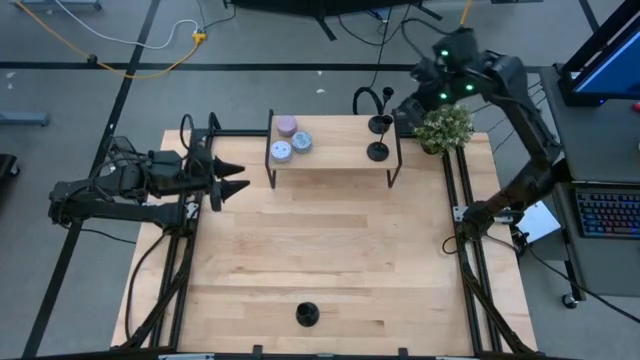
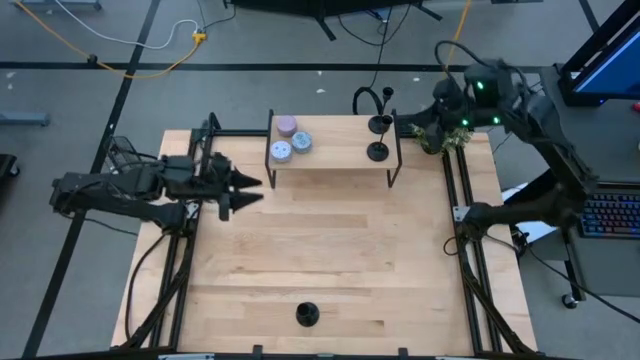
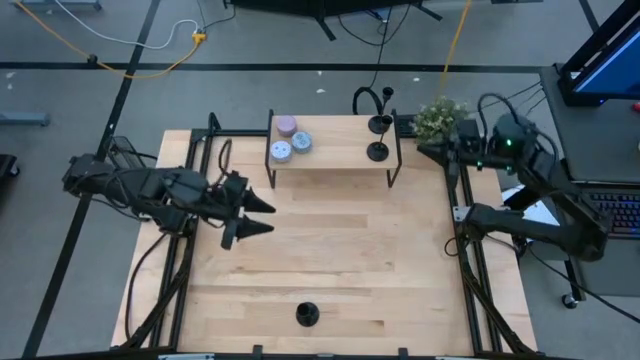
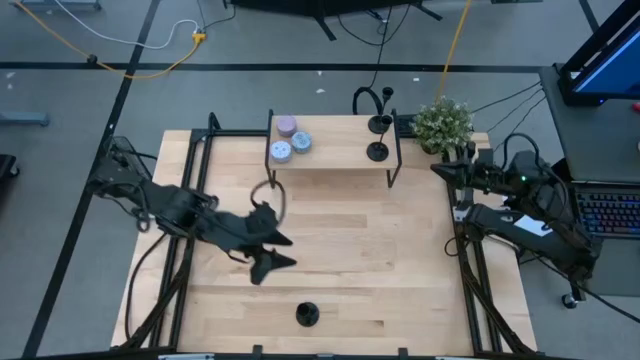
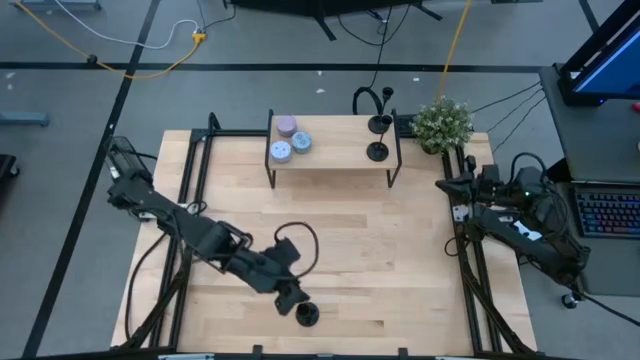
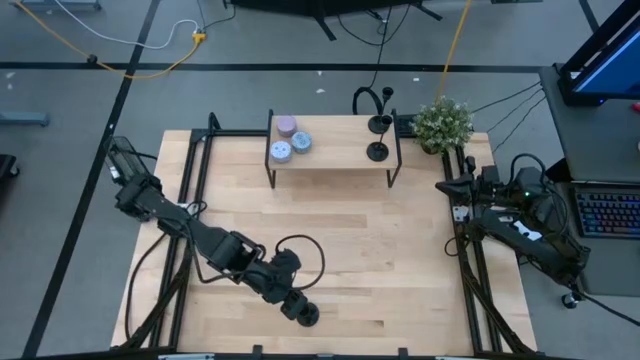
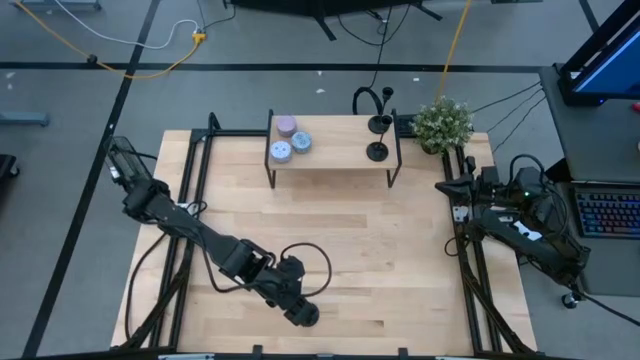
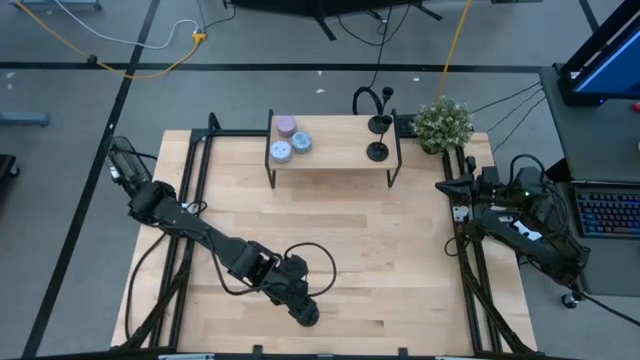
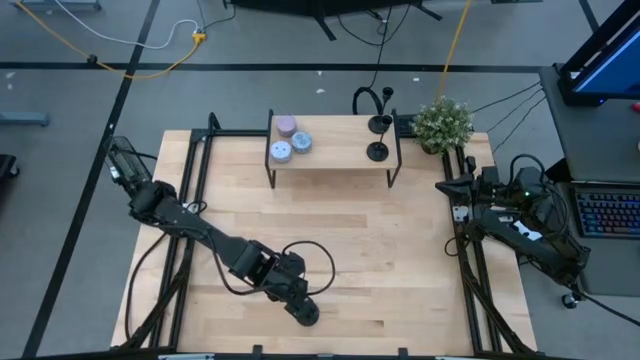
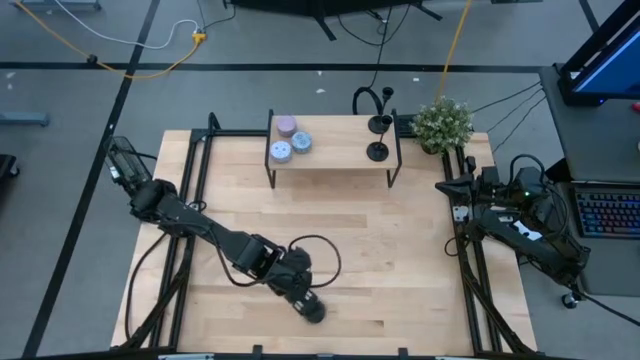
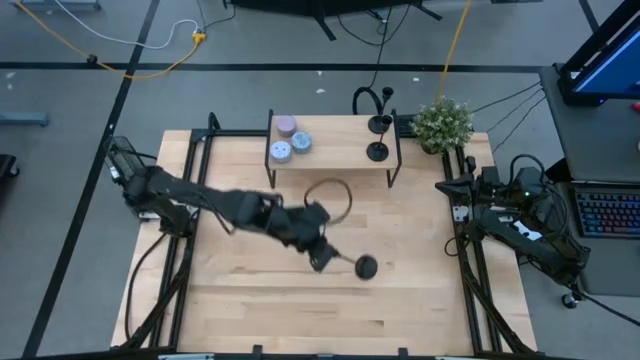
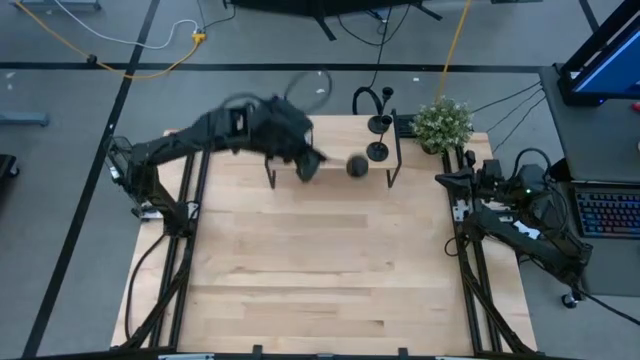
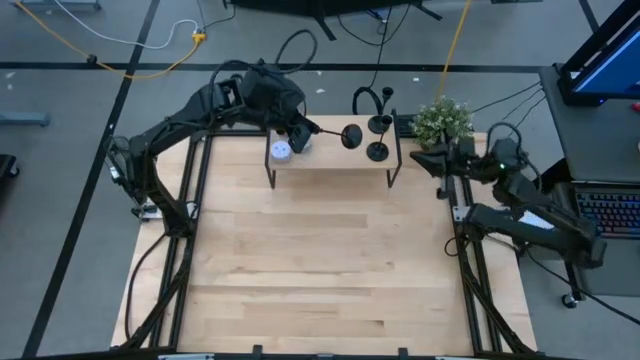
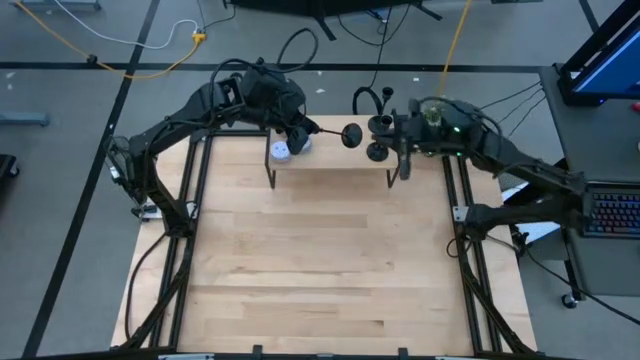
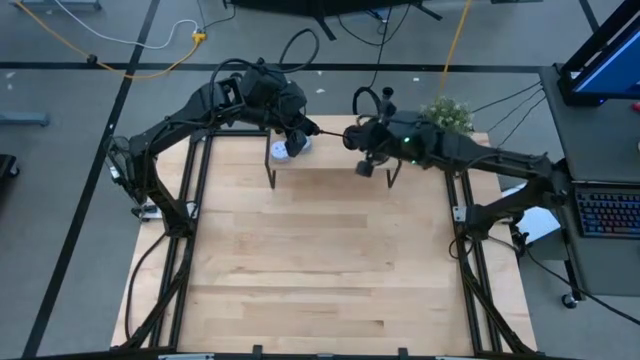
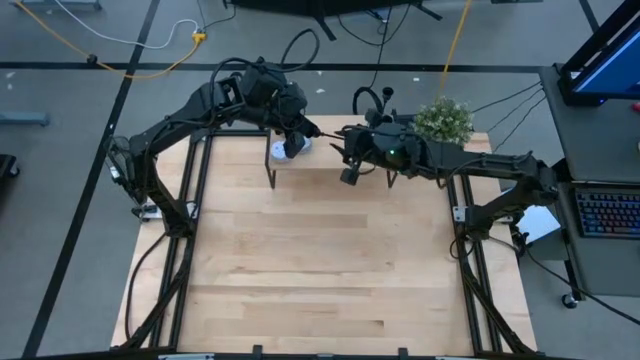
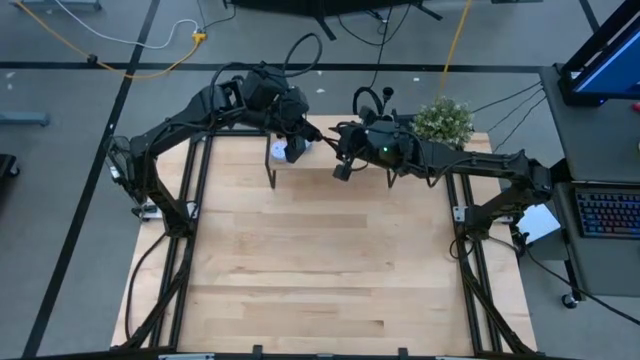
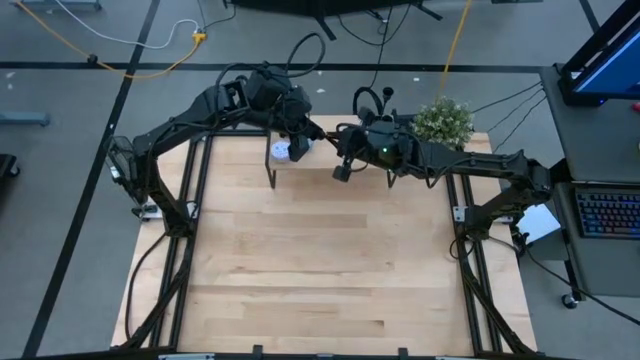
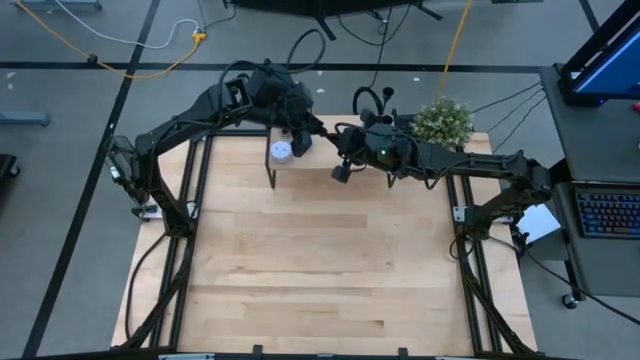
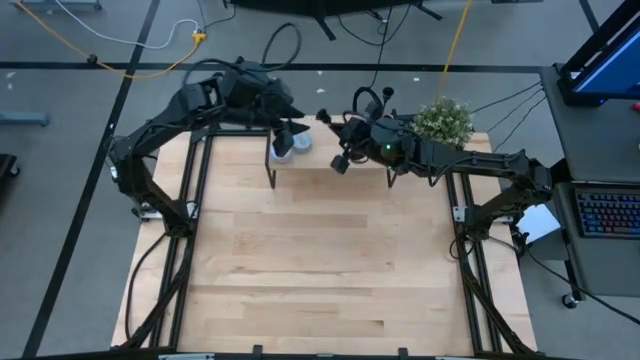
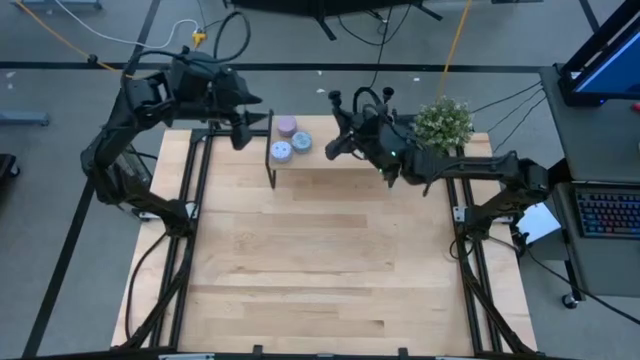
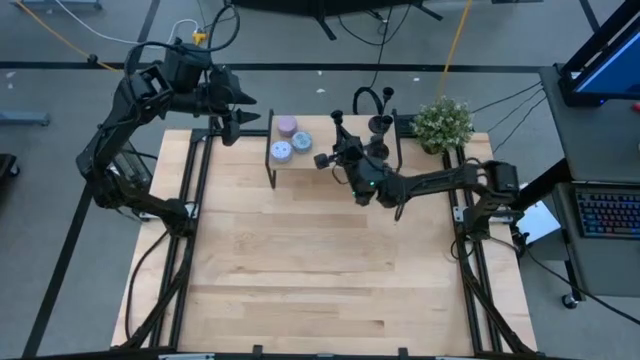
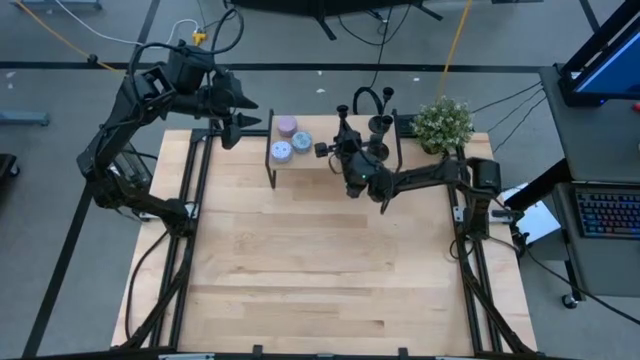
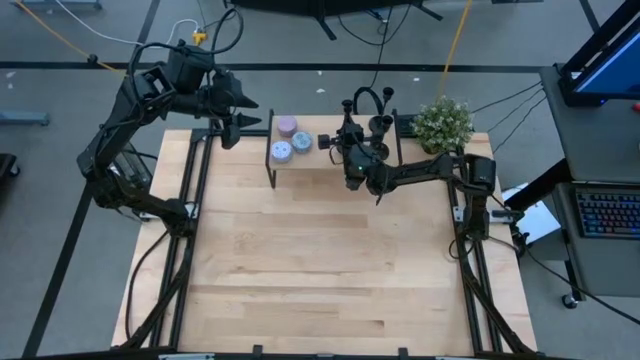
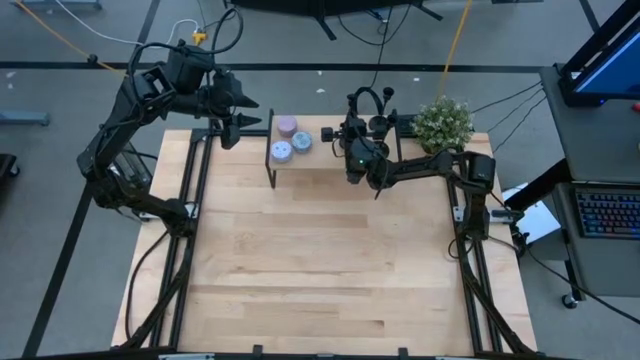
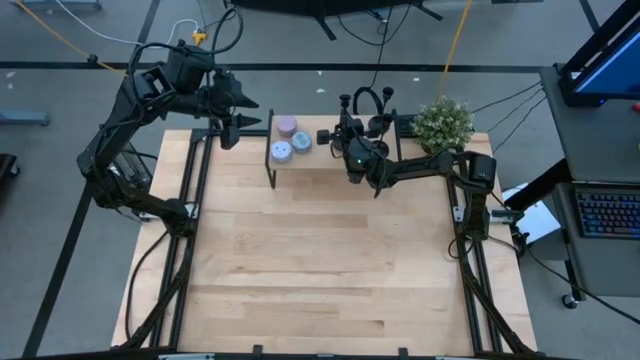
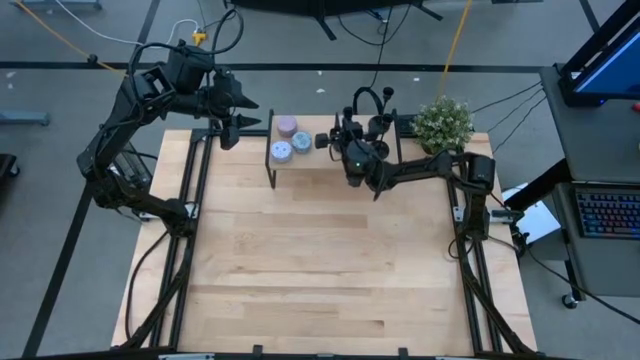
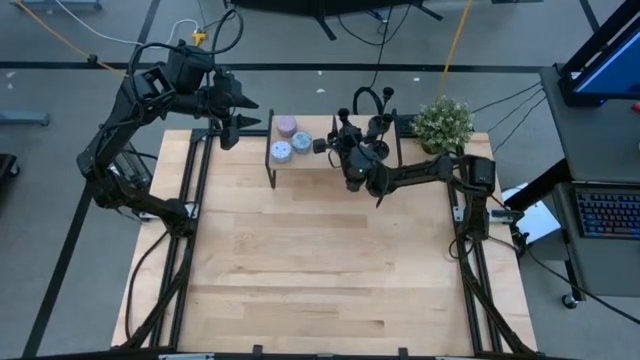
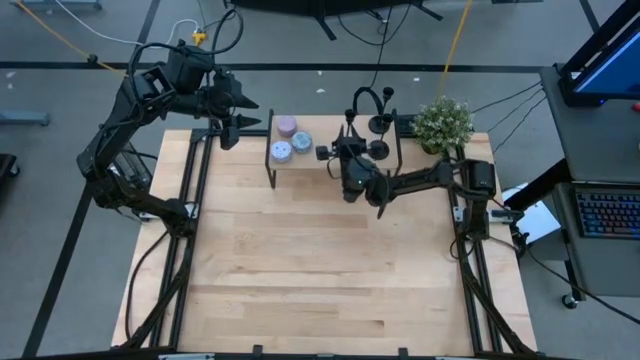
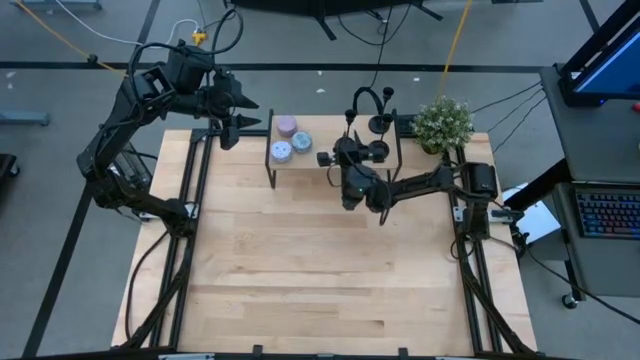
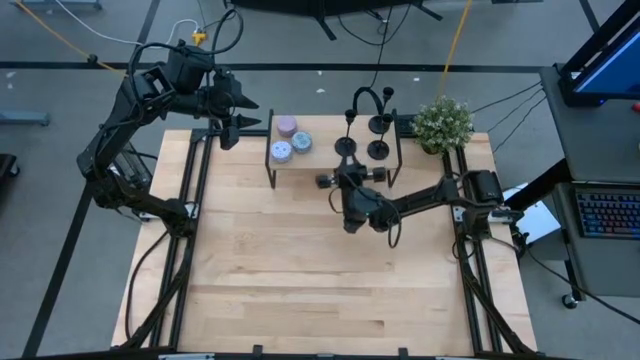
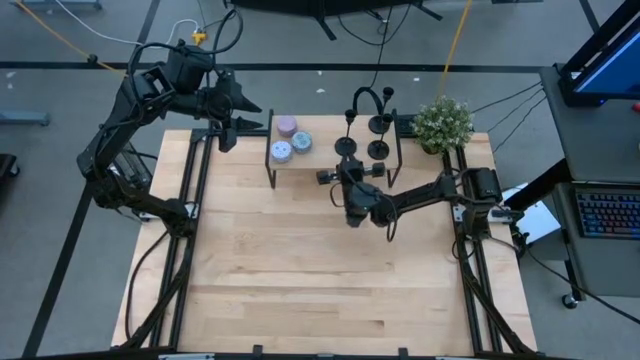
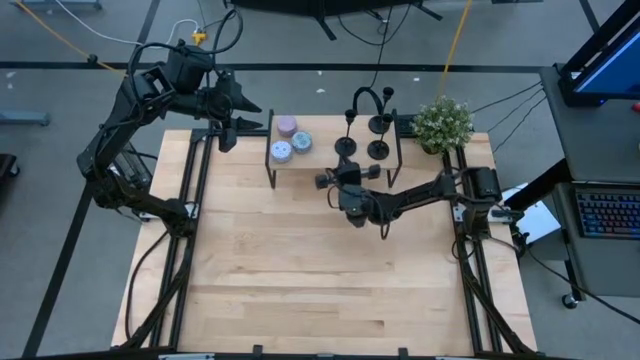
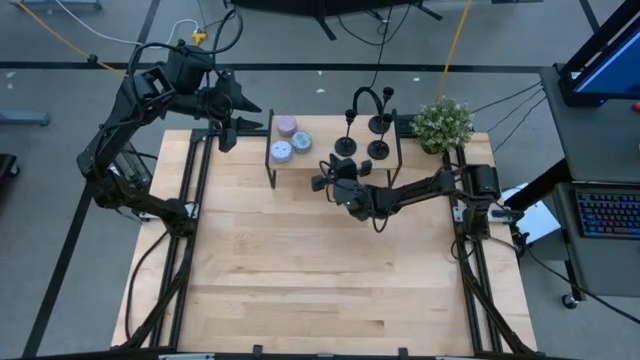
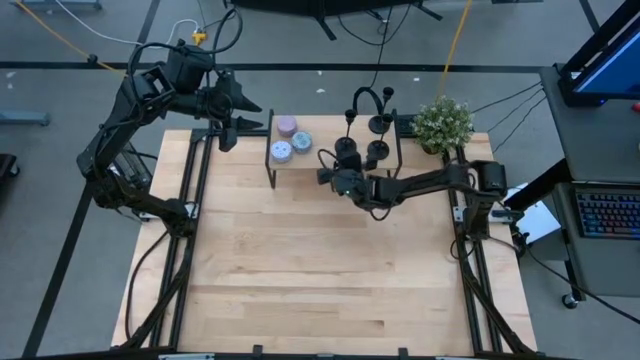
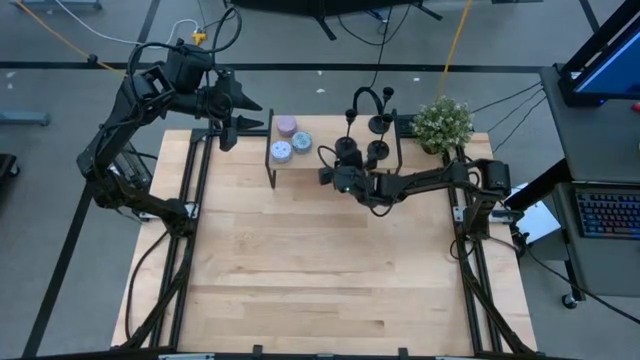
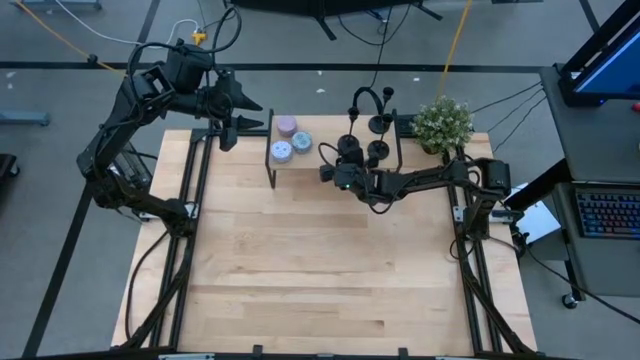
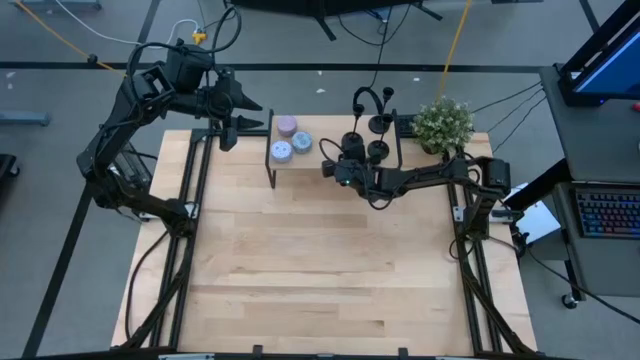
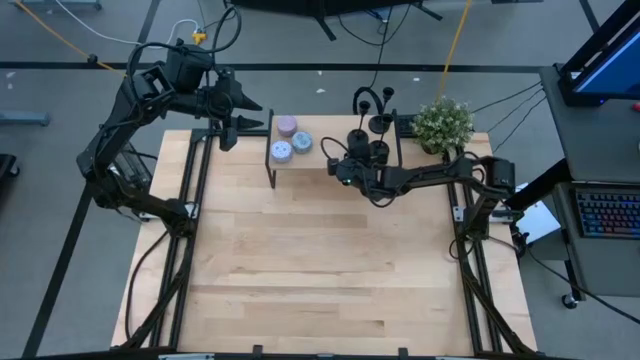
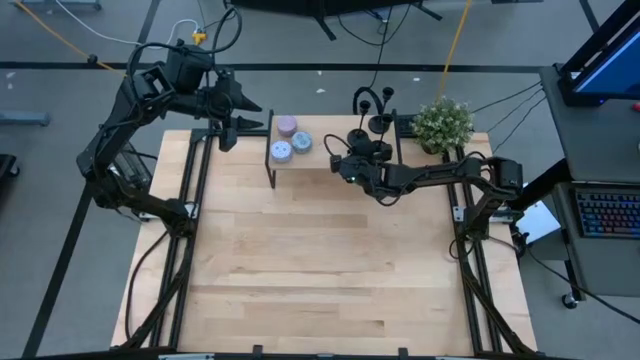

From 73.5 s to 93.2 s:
Task: Pick & Place candle stick holders
Put the candle holder on the shelf

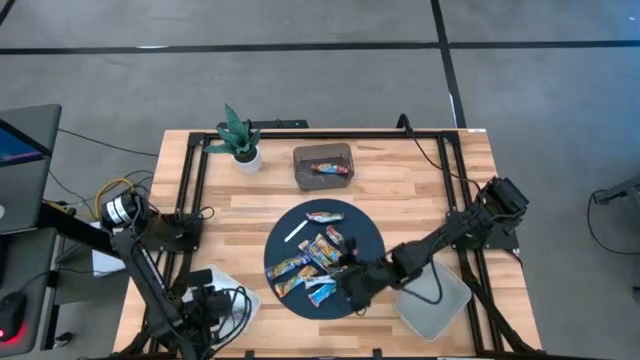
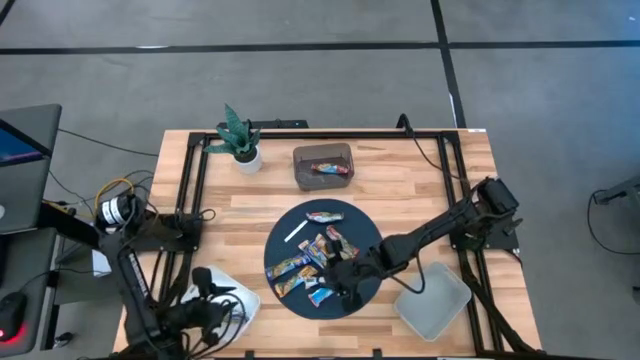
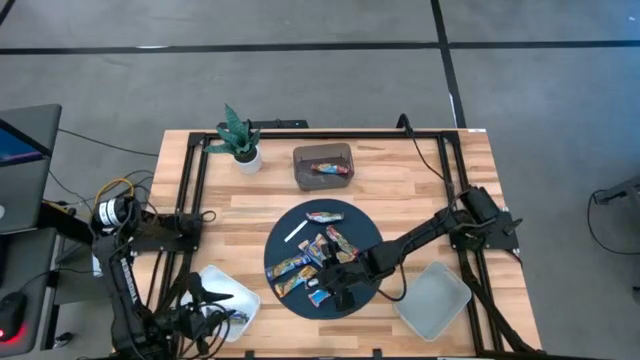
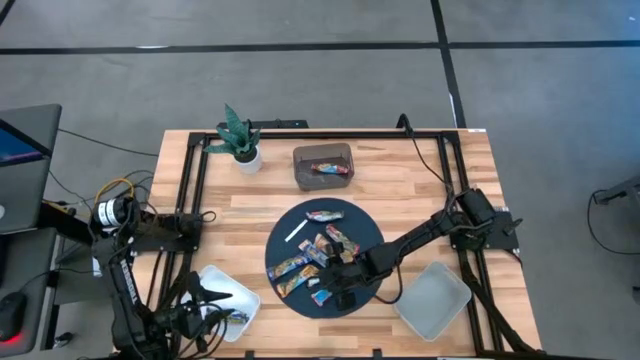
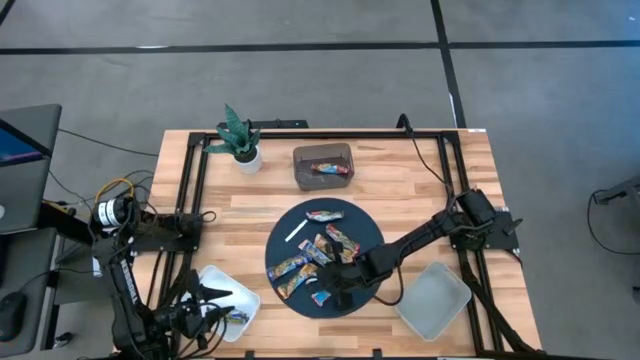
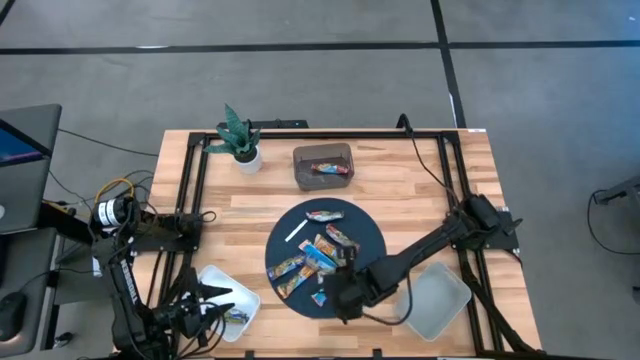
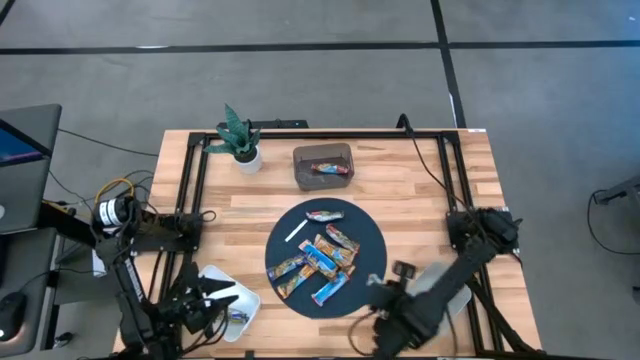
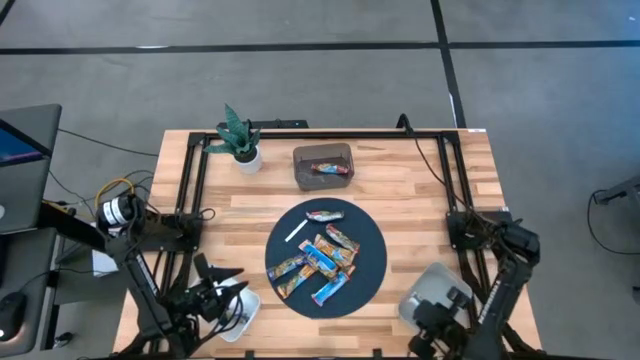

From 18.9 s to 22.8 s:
Task: Pick and place Granola Bars by type
Put the yellow granola bar into the gray bin
